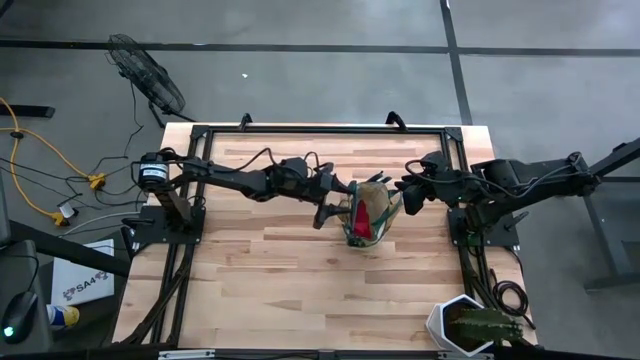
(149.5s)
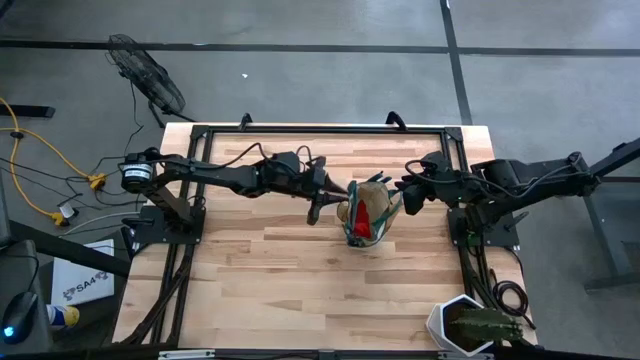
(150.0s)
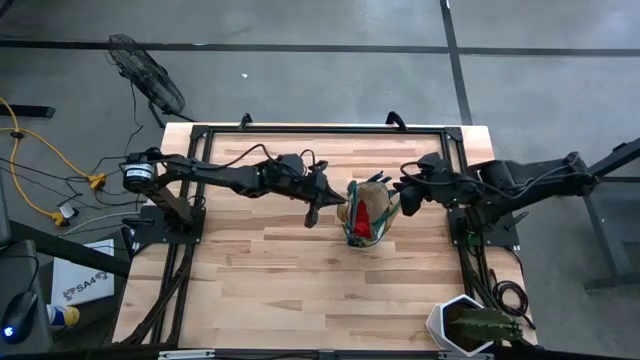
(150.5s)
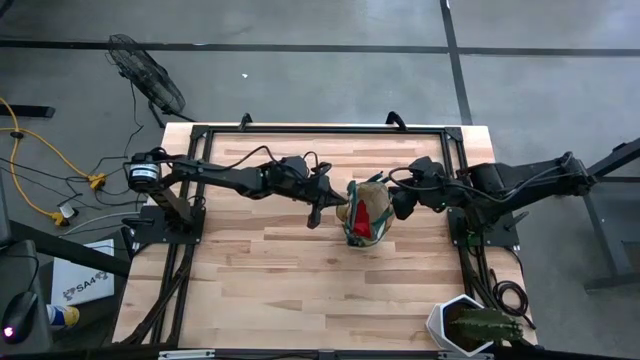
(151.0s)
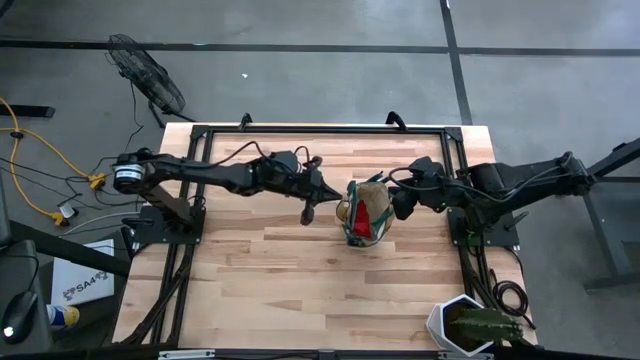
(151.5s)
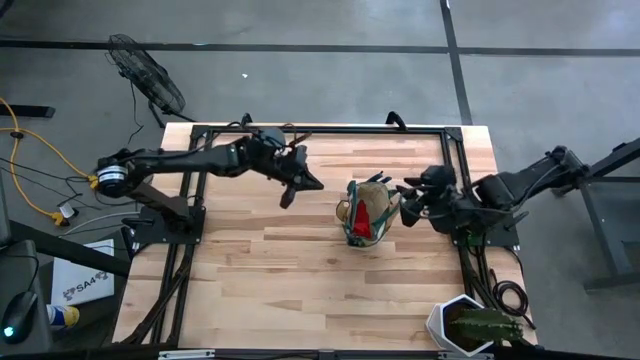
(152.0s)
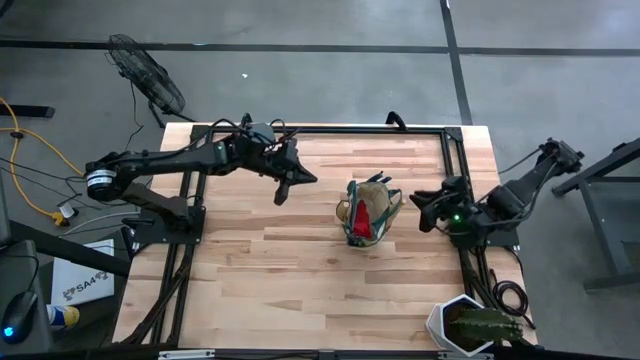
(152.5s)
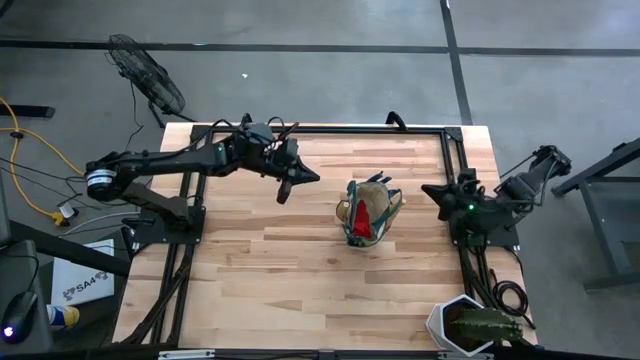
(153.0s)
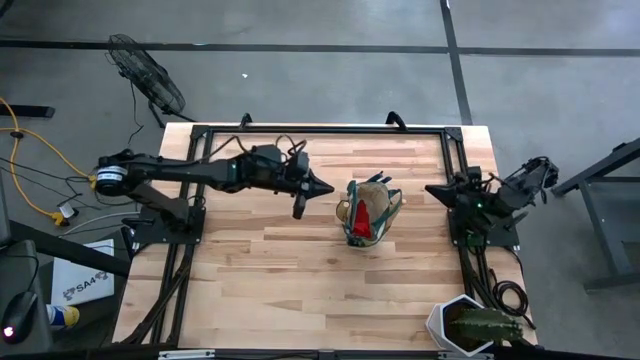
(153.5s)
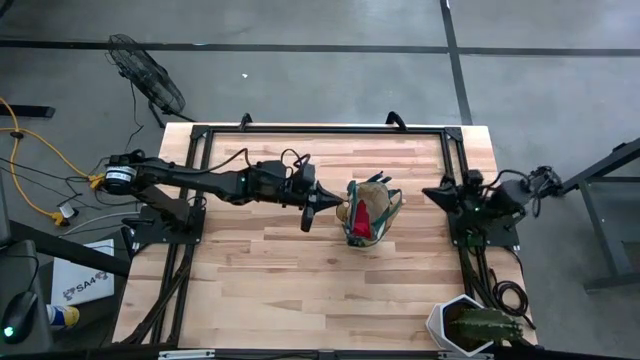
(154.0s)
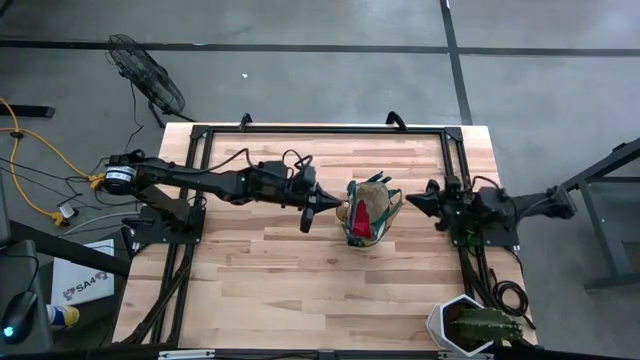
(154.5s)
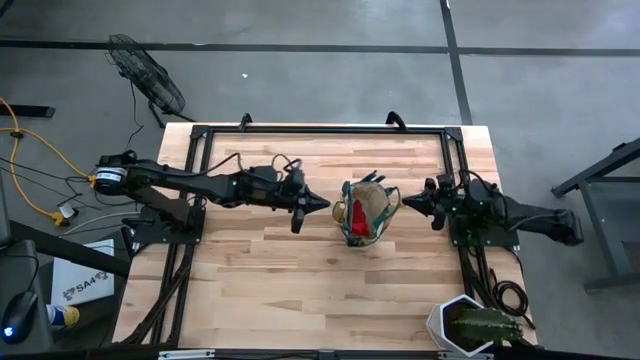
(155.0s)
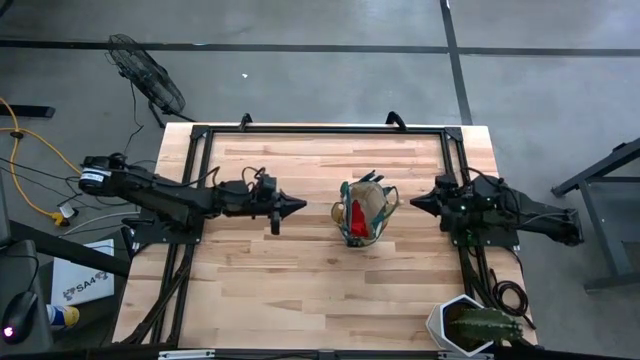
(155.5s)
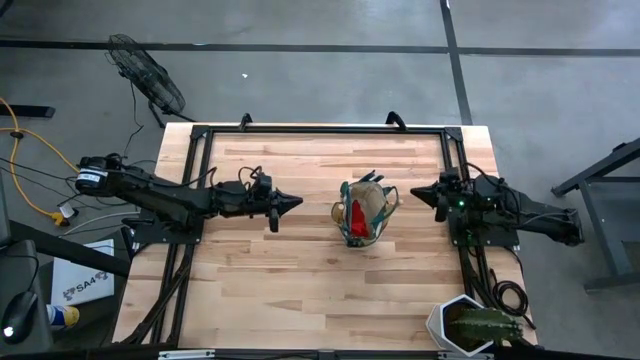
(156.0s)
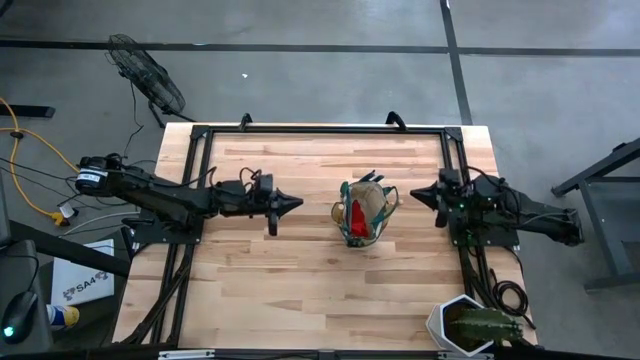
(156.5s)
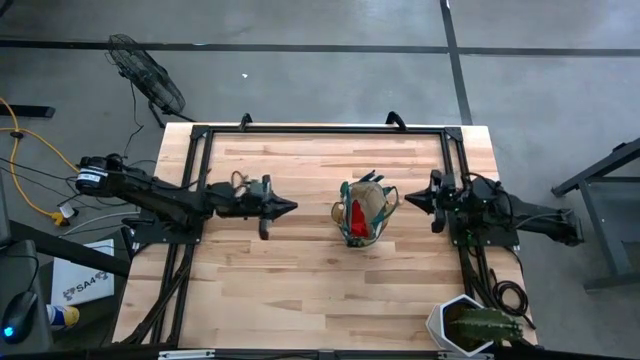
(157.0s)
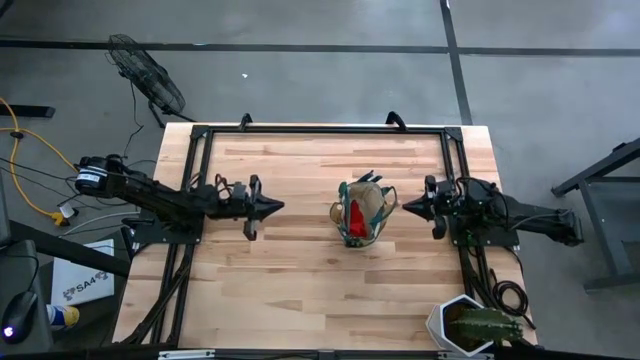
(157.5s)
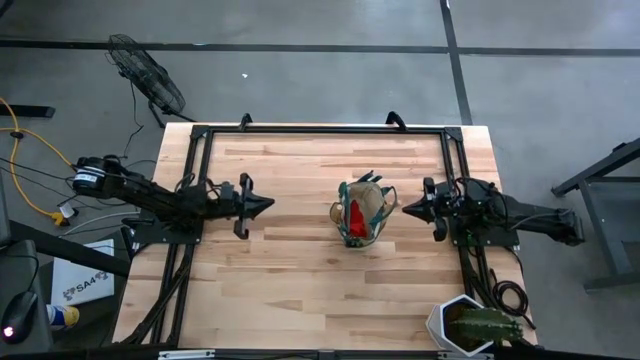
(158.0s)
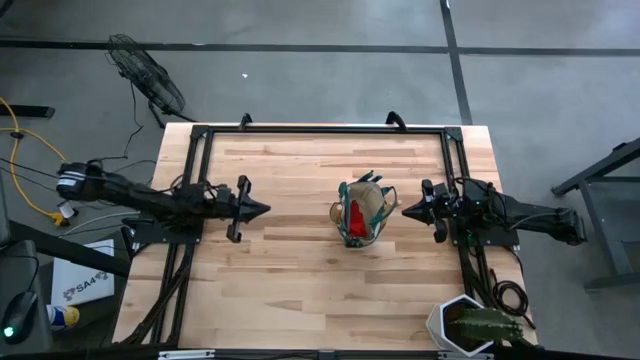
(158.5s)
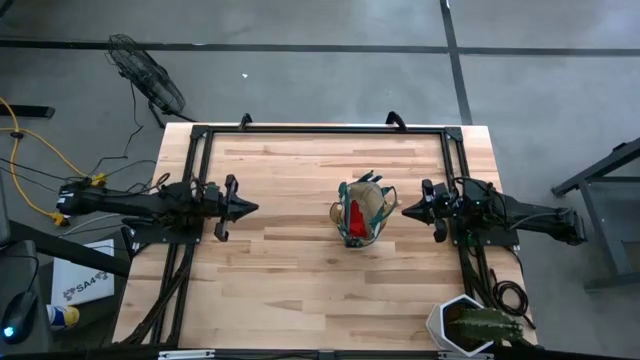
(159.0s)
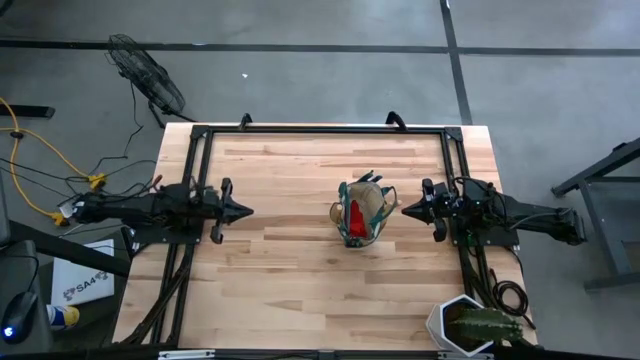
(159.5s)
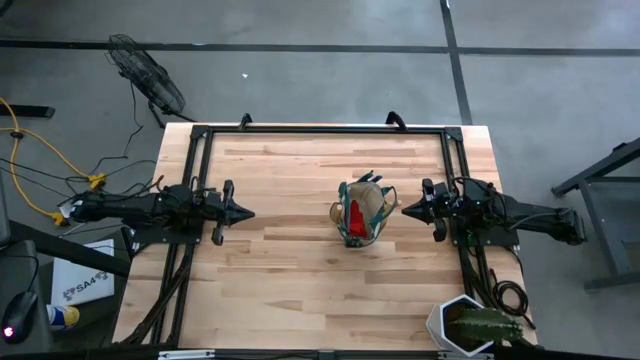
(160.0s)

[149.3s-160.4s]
Task: Pick & Place Garden tools in Gardening bag
Return to Home Position

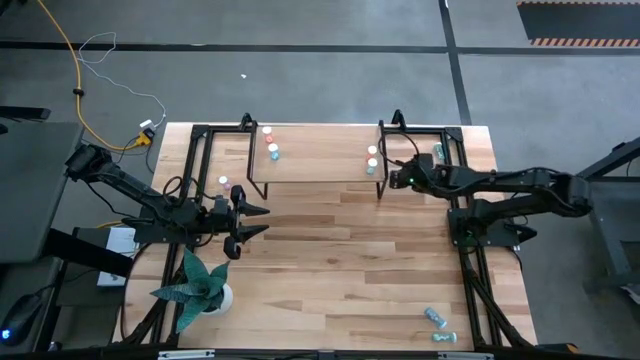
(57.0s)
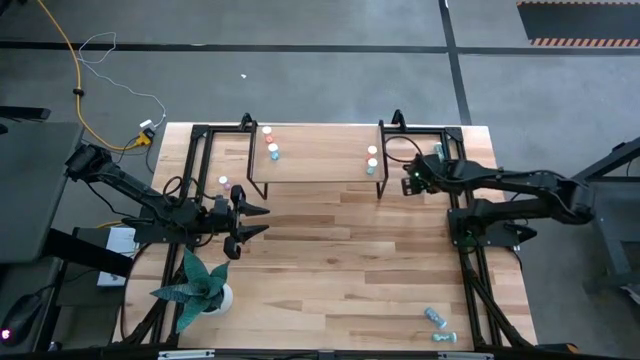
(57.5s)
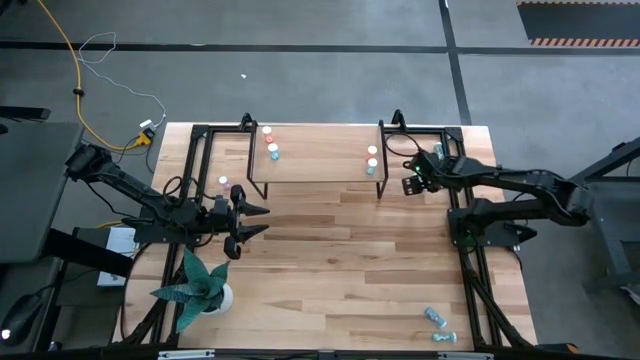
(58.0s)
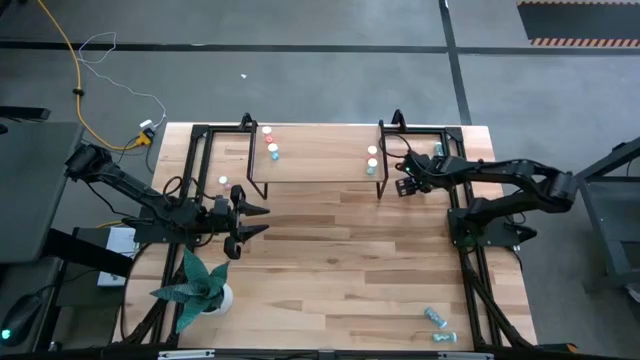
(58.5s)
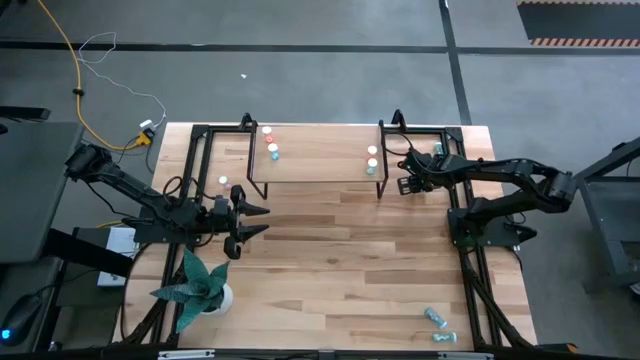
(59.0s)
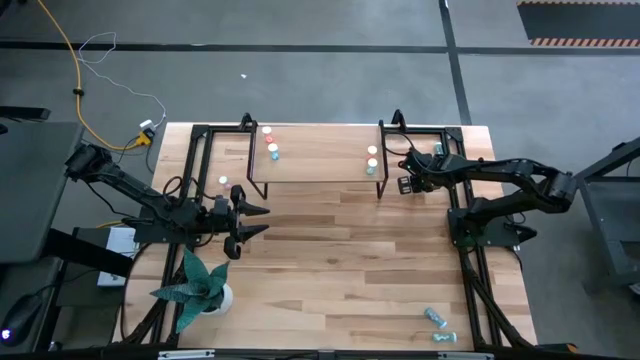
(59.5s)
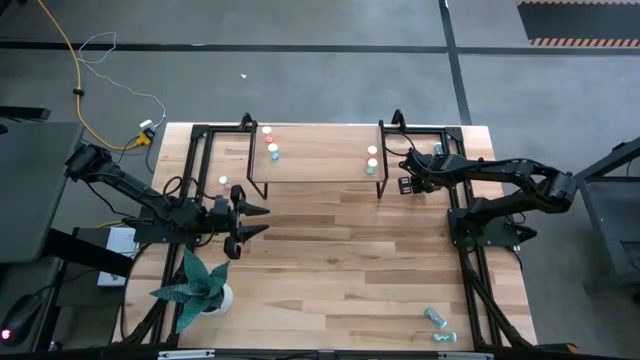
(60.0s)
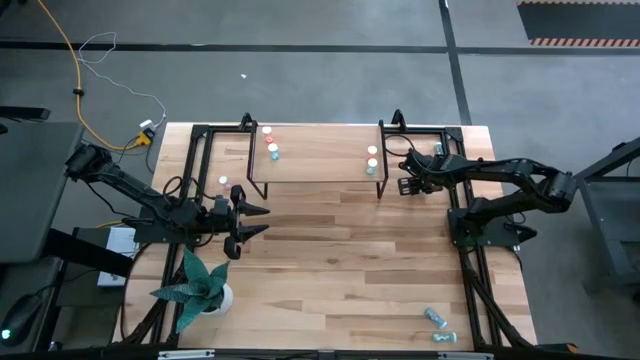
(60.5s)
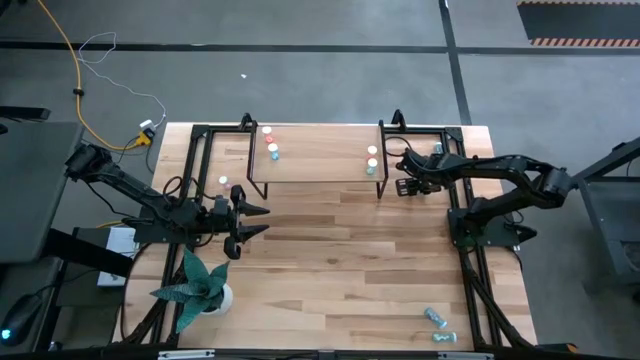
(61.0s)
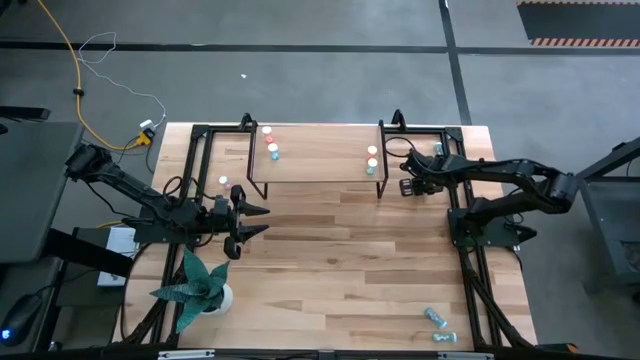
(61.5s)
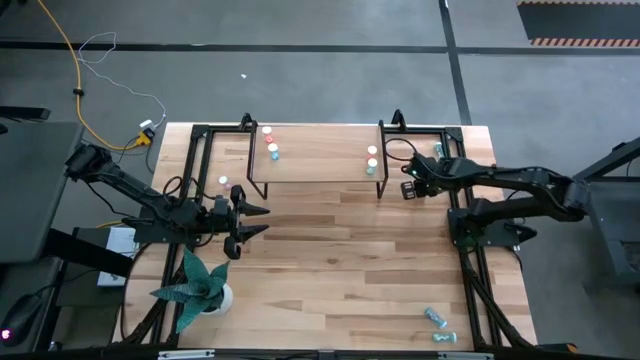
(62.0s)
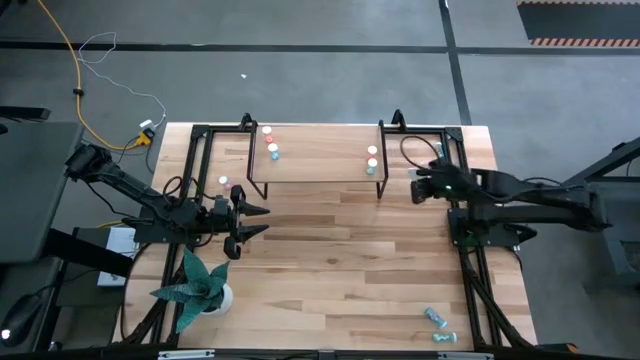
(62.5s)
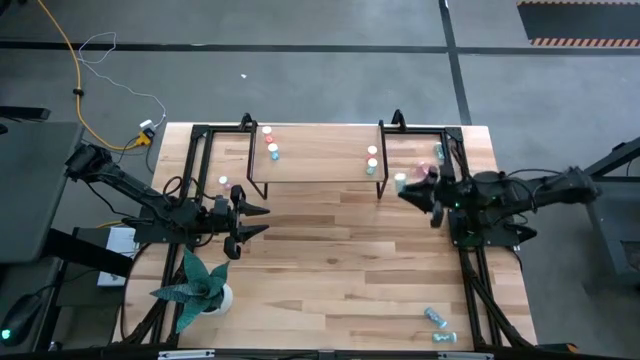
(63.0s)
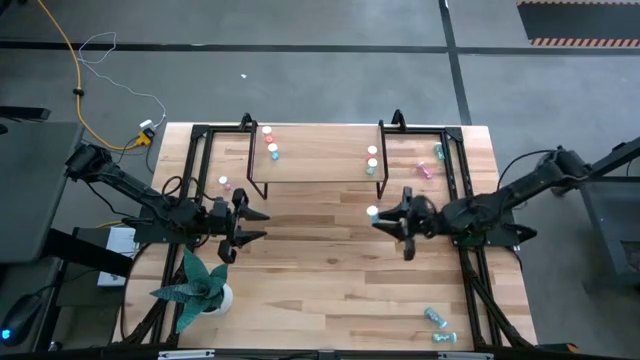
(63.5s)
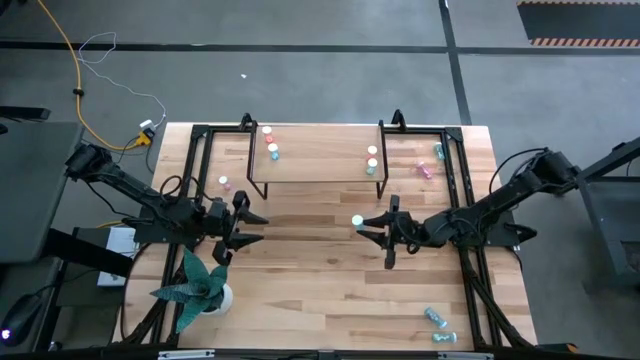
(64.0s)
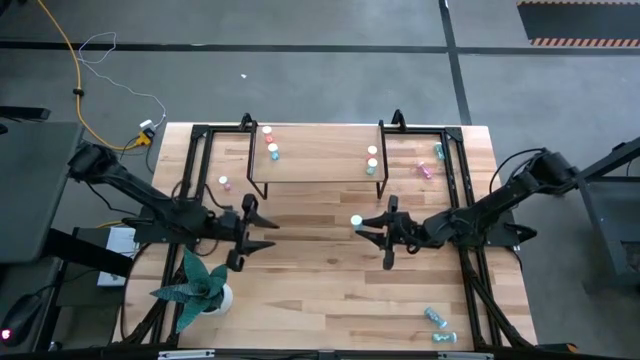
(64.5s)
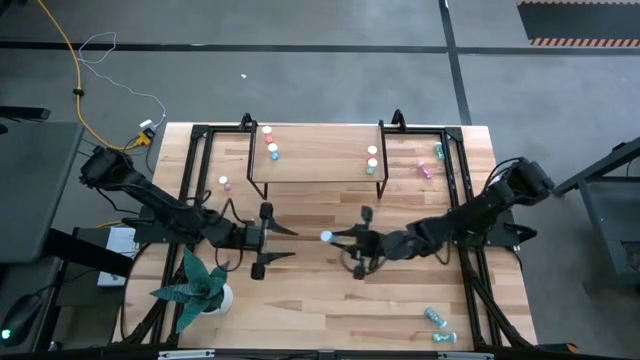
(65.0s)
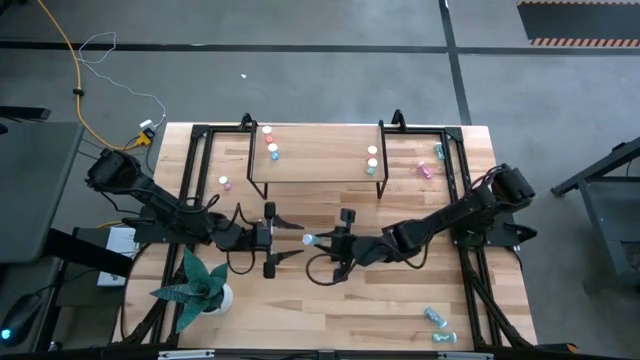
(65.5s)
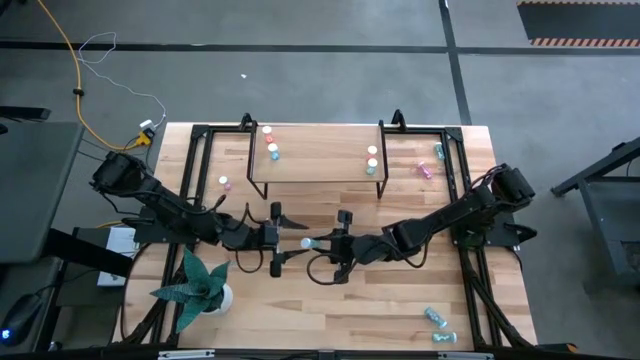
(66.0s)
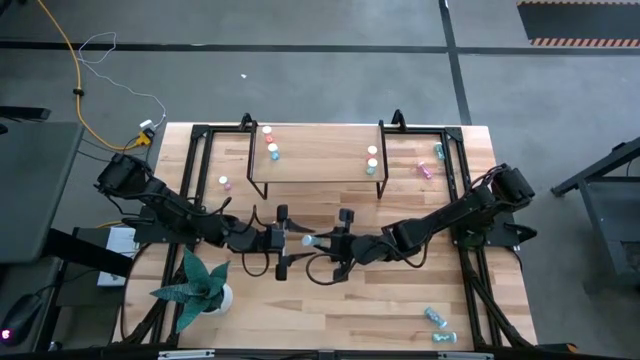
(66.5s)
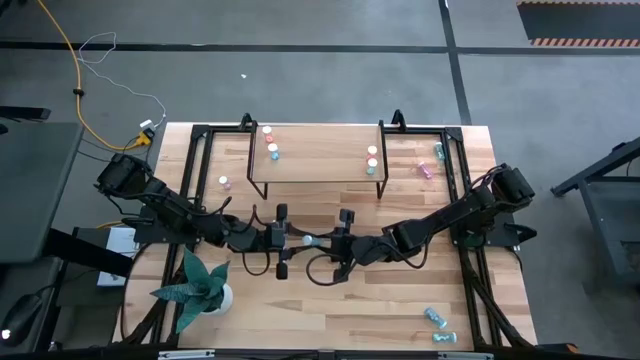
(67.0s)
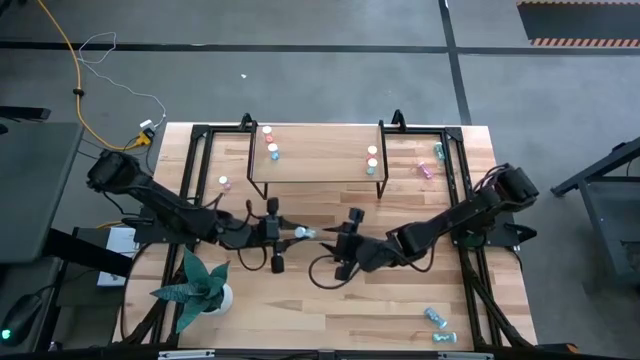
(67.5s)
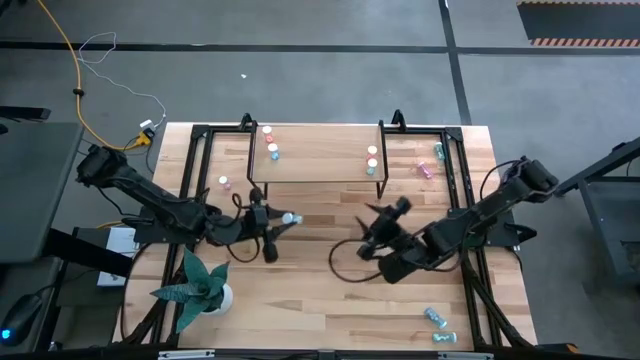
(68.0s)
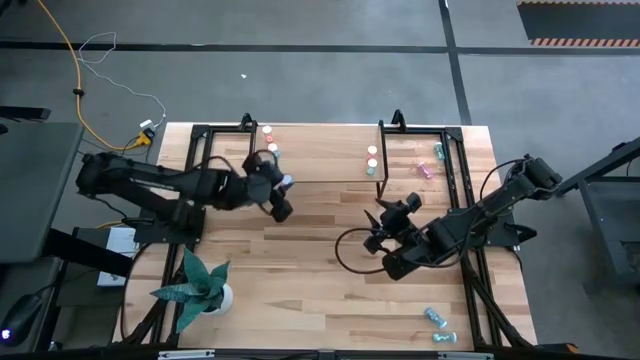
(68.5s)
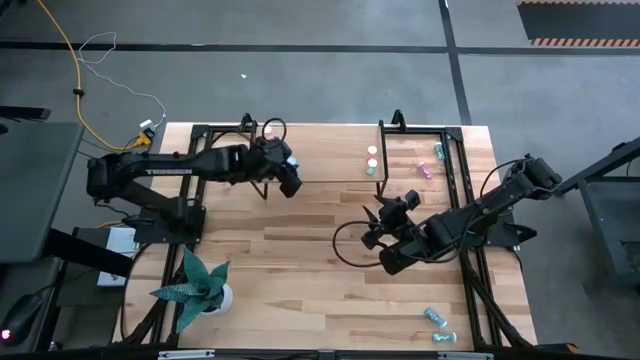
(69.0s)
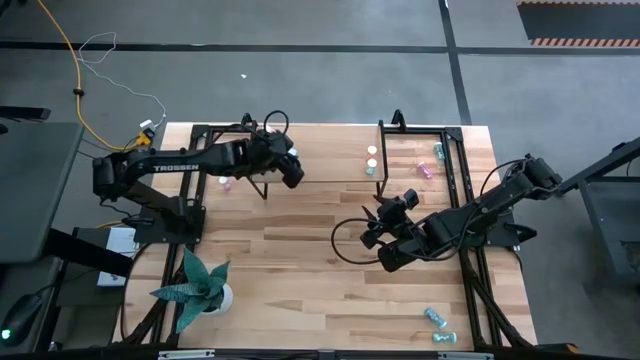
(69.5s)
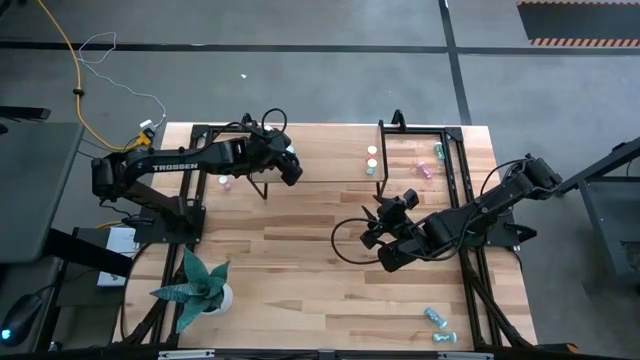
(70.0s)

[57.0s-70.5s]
Task: Pick and place medicine bottles onto shelf by color
Put the green pill bottle on the shelf
